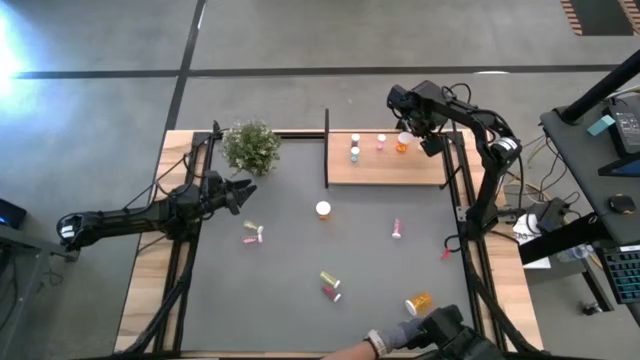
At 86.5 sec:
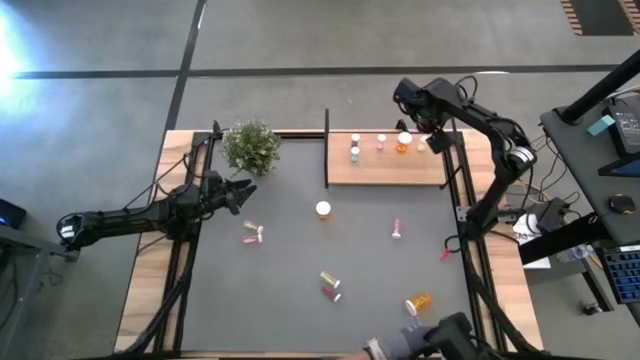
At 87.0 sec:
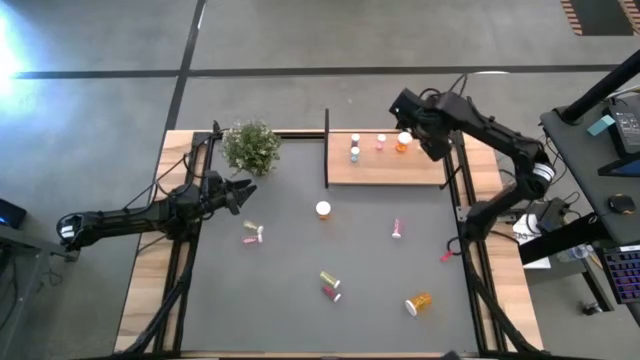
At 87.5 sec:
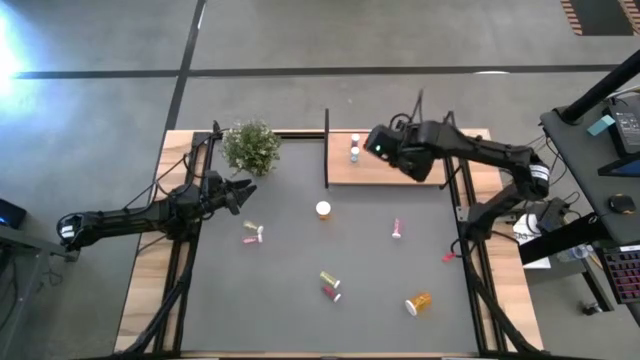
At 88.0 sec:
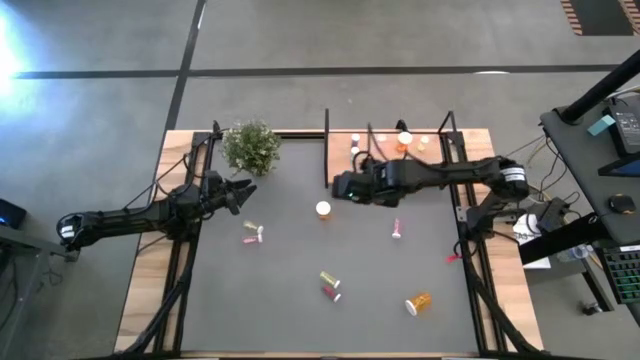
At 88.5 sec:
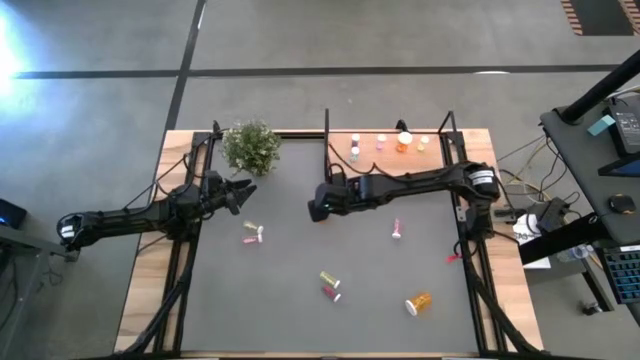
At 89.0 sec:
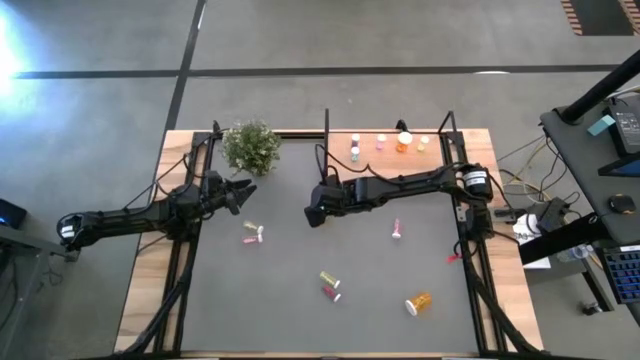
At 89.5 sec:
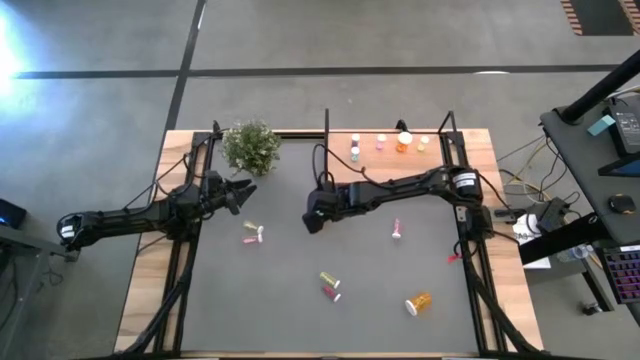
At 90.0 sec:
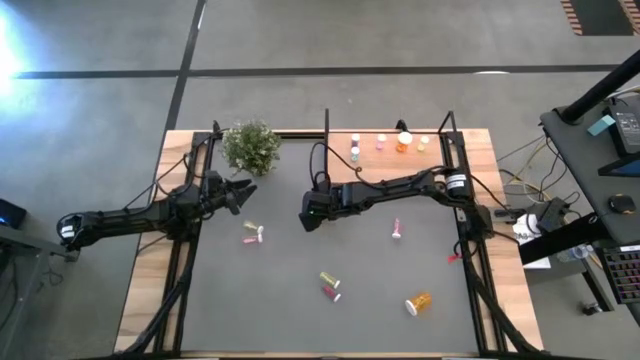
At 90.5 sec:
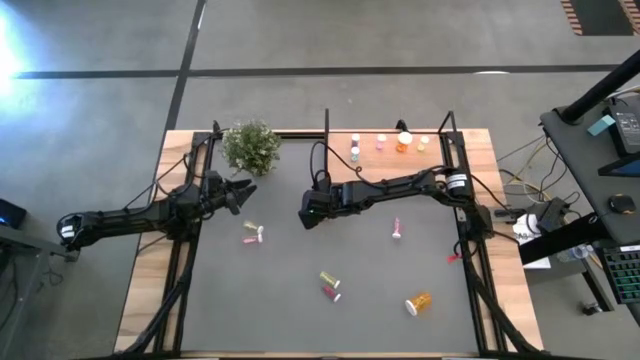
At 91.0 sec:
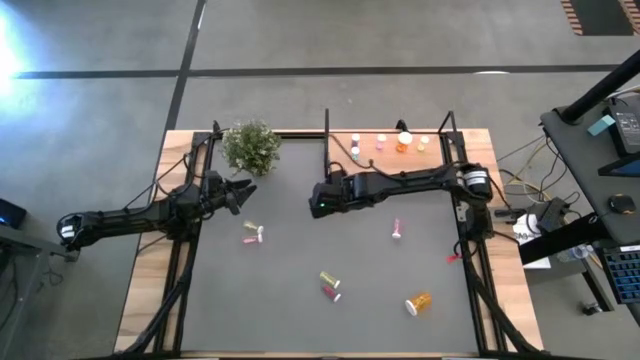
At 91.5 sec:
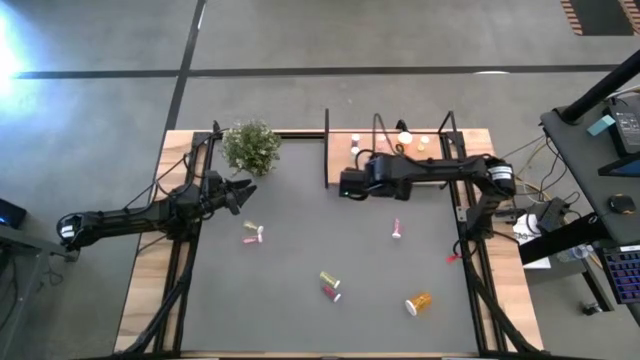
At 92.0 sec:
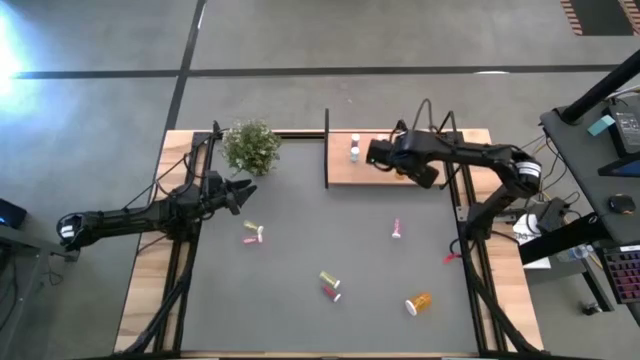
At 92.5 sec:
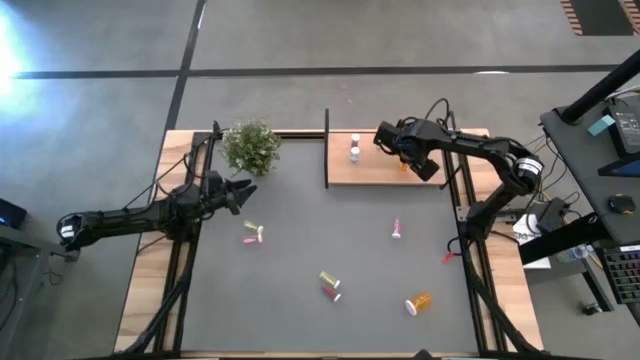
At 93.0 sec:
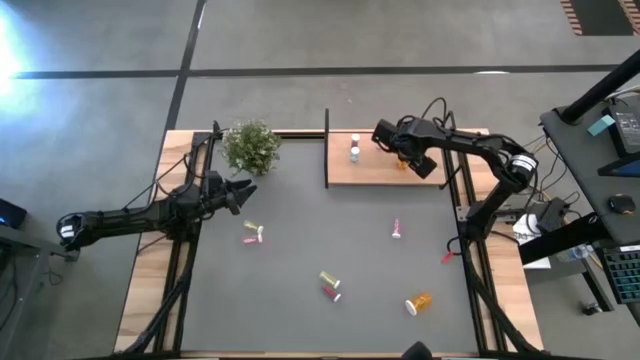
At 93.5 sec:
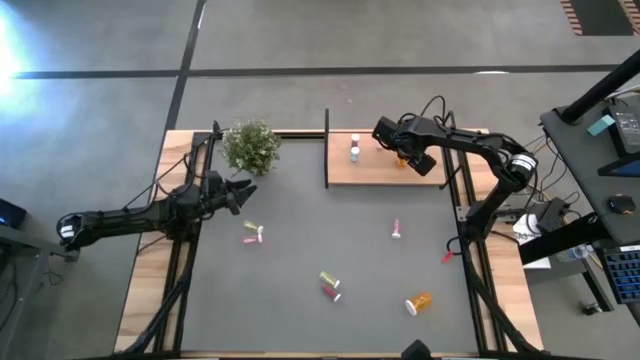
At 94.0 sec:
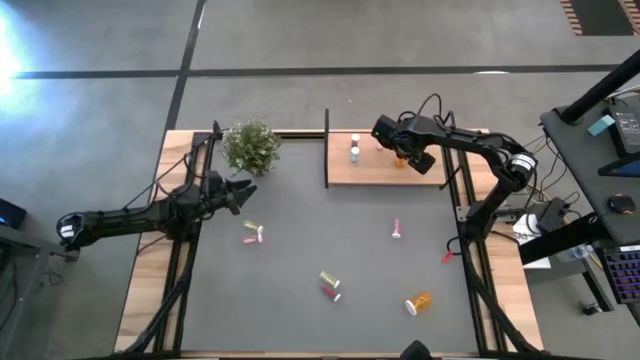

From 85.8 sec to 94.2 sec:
Task: Pick and place medicine bottles onto shelf by color
Put the top orange pill bottle on the shelf aligned with the other orange pill bottle

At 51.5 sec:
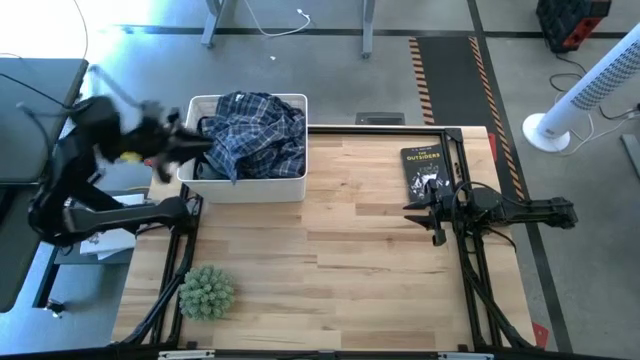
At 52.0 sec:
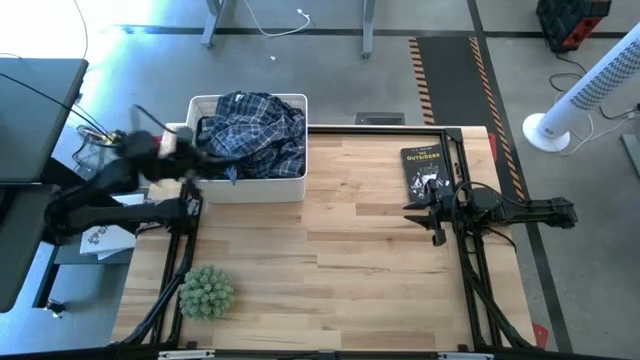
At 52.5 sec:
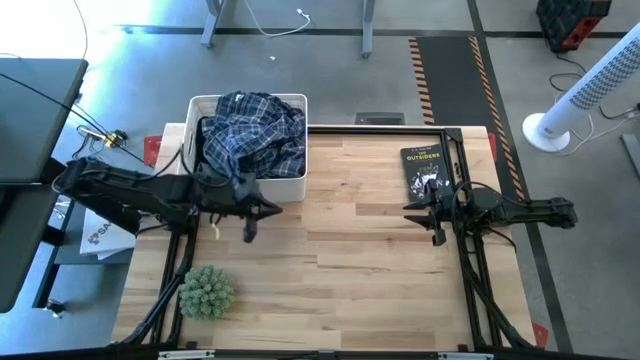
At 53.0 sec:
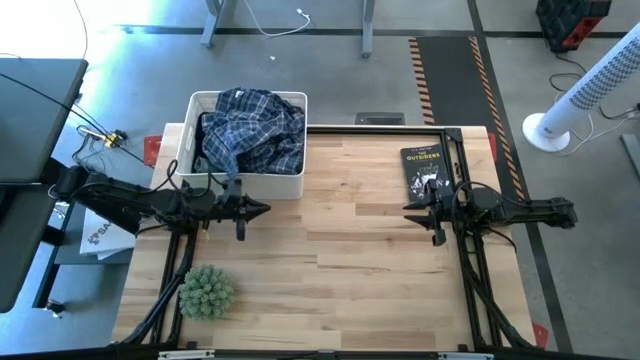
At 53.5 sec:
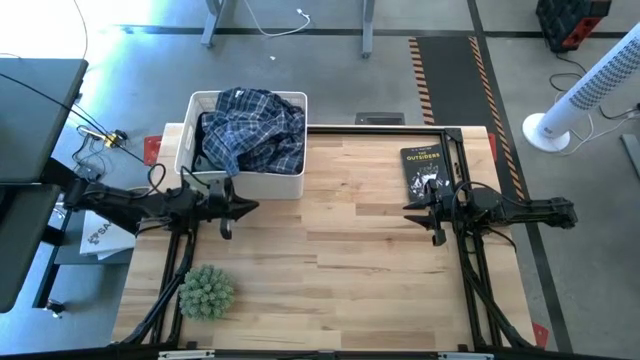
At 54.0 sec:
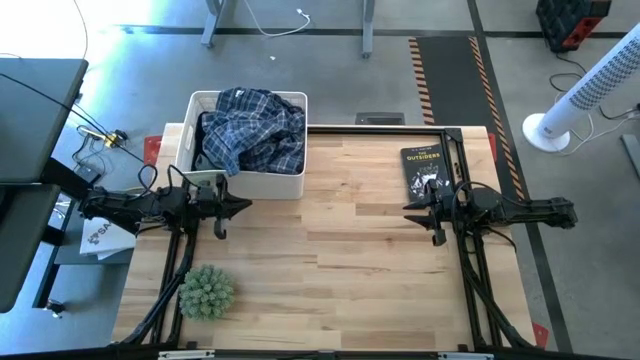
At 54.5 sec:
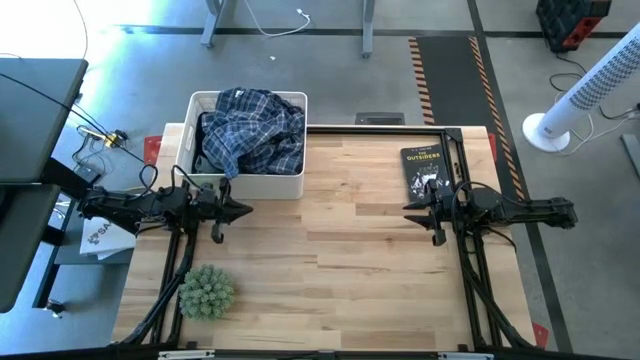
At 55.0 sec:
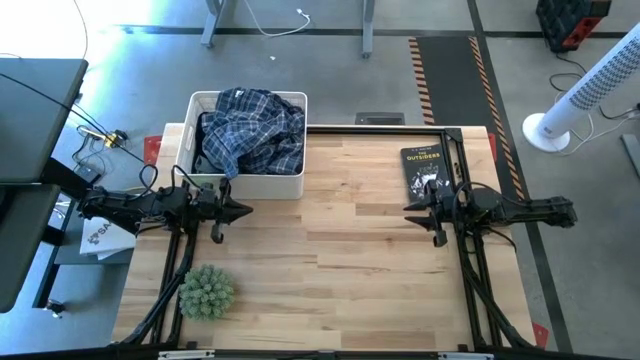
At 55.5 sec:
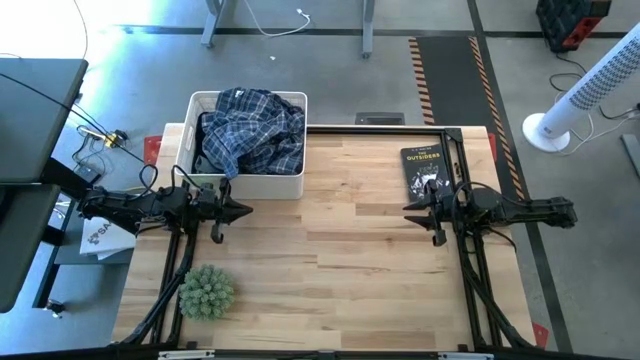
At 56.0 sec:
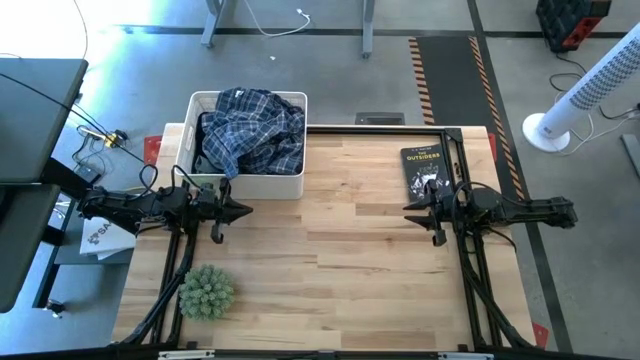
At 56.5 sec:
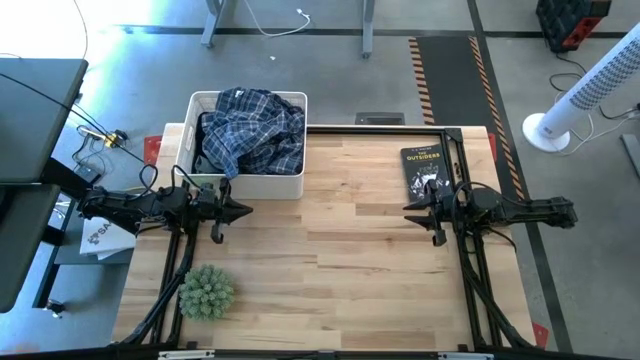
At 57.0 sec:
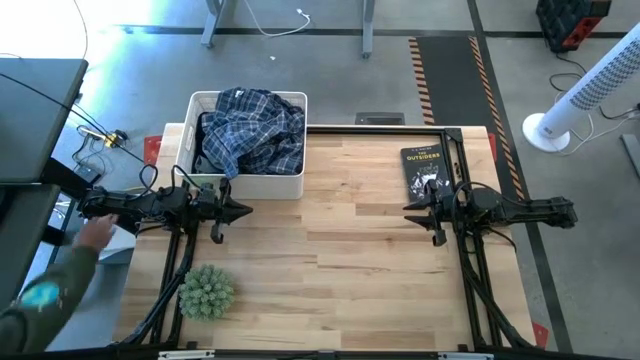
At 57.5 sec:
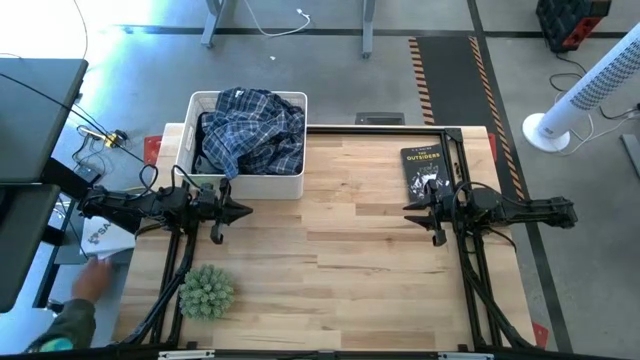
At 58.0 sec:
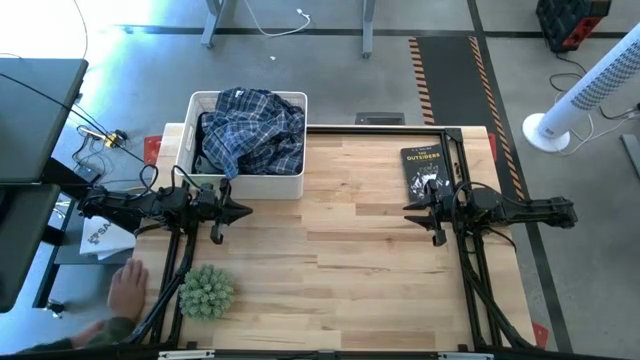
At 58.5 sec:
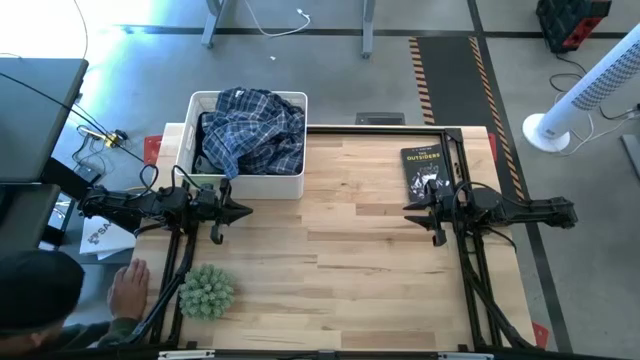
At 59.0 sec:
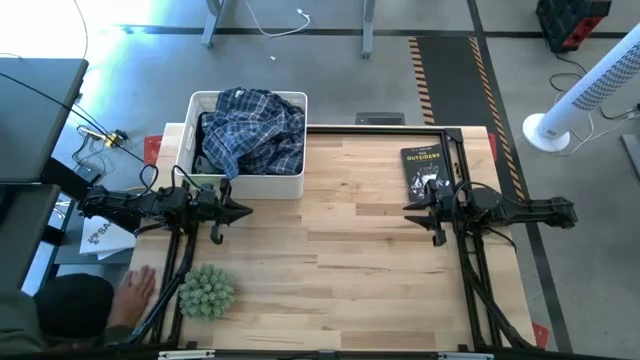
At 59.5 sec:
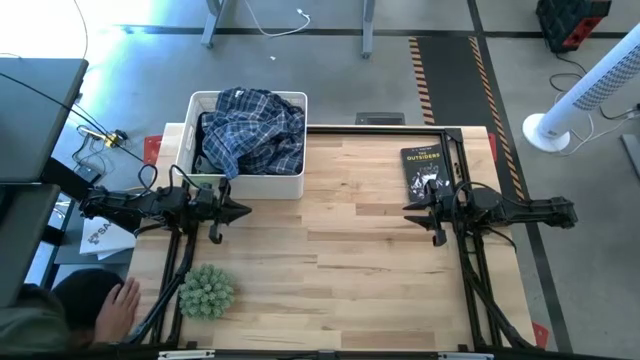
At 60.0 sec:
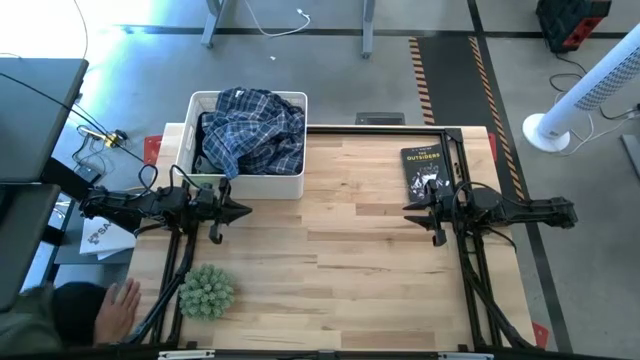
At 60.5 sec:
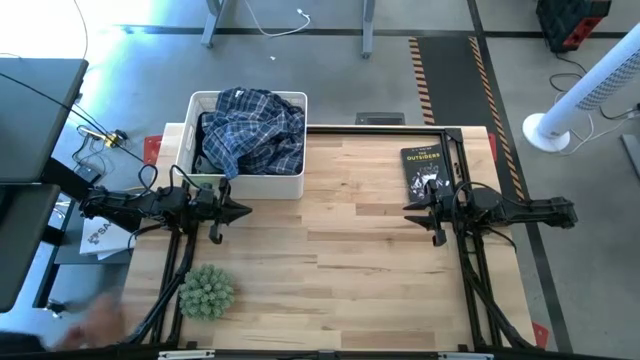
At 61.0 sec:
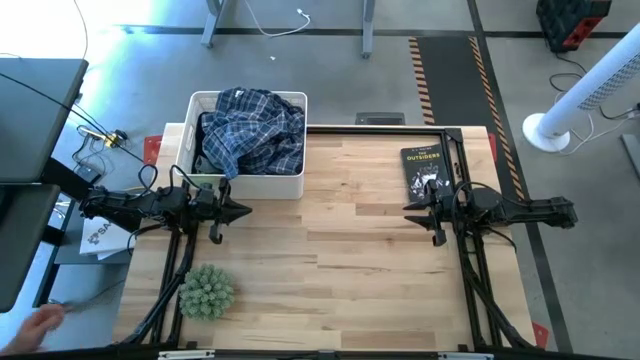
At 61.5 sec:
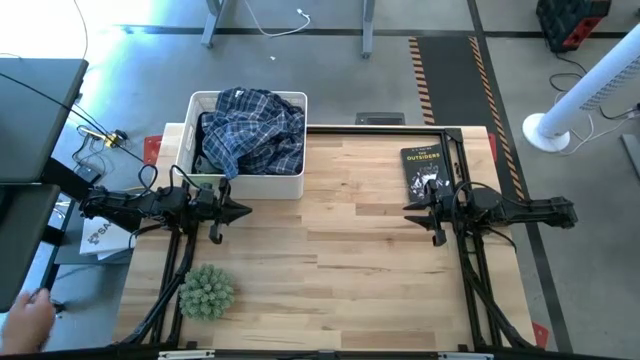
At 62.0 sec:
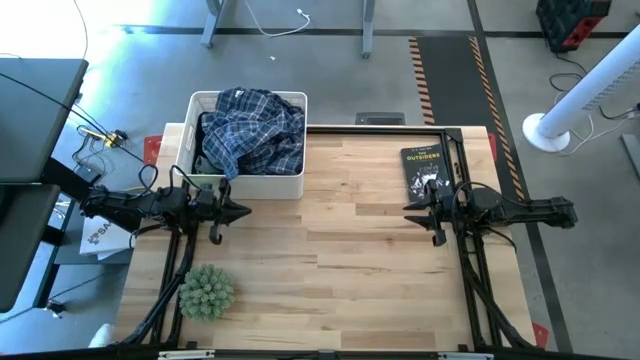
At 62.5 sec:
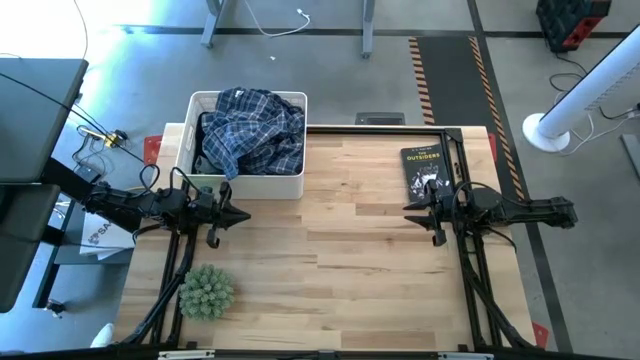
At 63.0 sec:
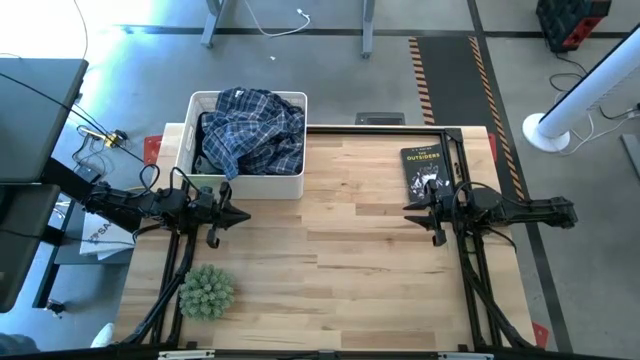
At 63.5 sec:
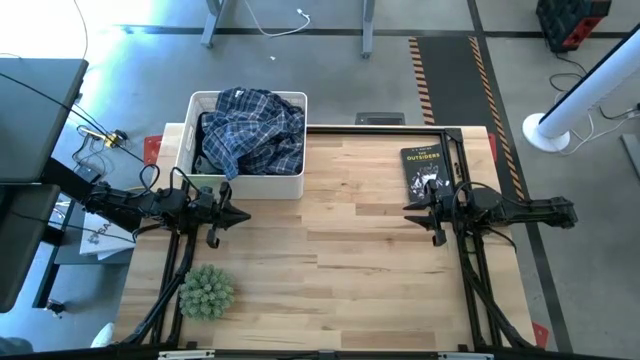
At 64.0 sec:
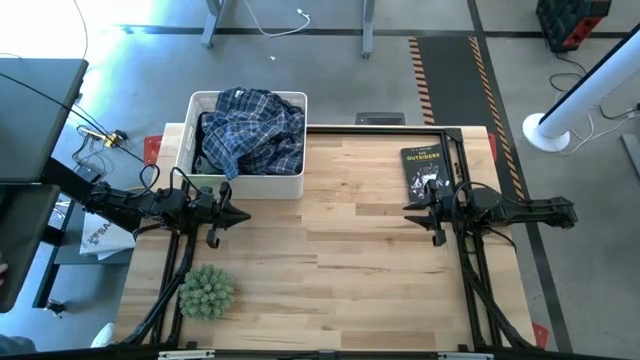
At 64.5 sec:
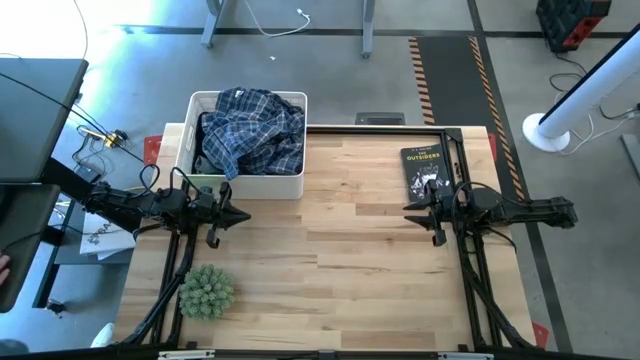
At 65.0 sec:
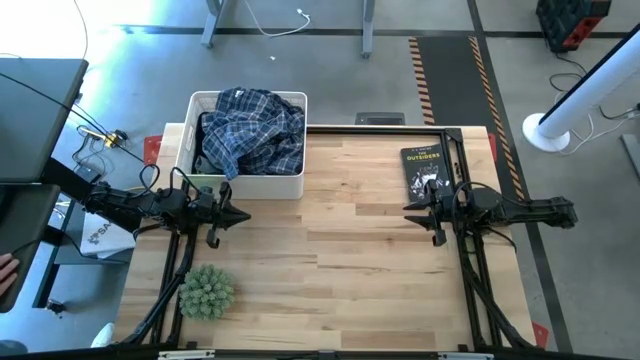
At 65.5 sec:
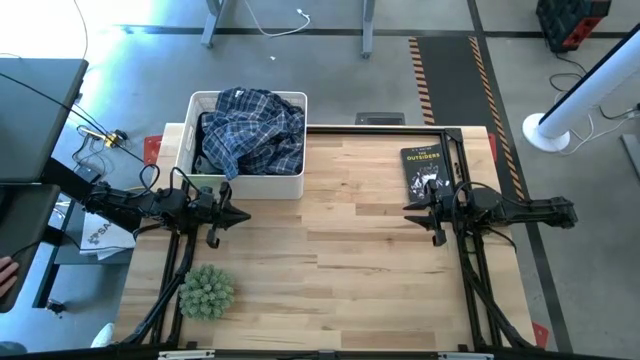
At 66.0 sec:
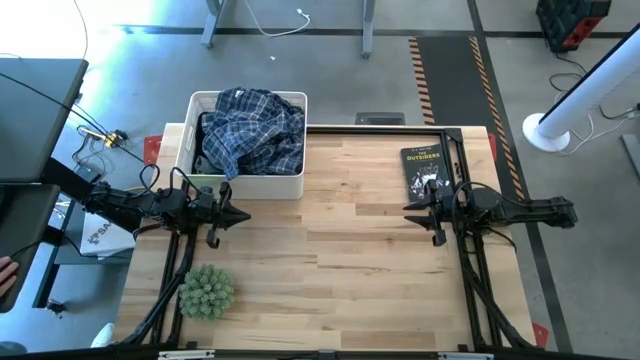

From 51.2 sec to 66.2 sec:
Task: Sort clothes
Return to Home Position
